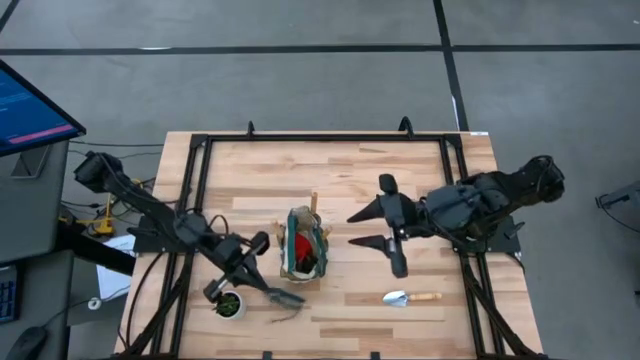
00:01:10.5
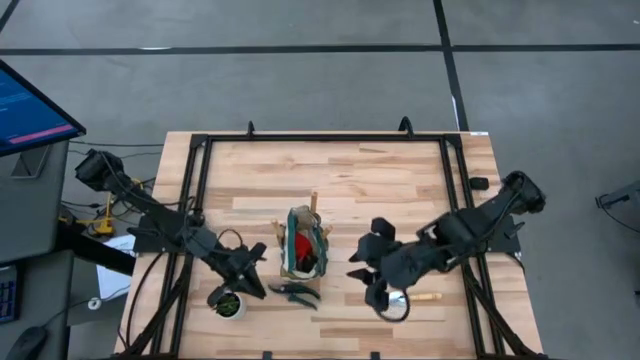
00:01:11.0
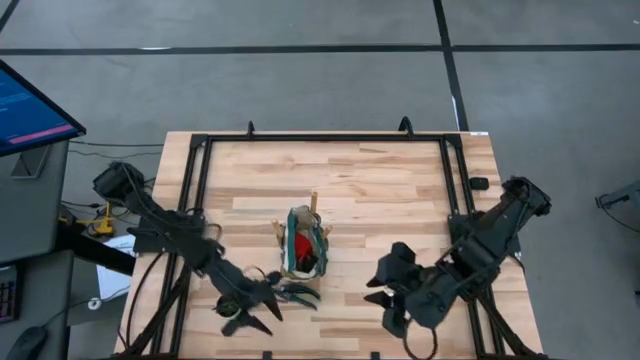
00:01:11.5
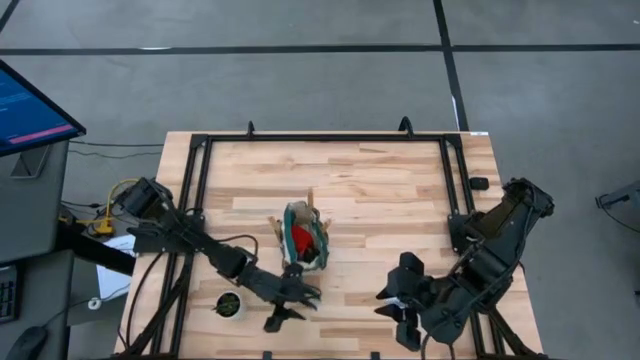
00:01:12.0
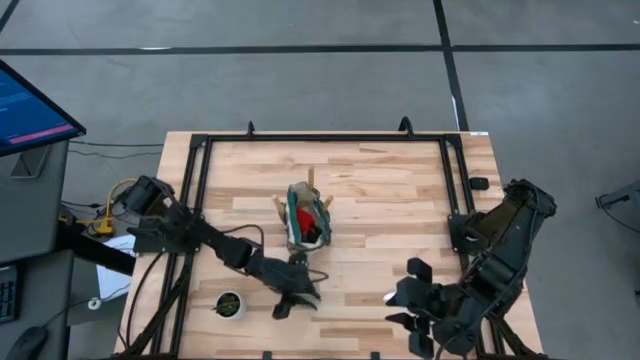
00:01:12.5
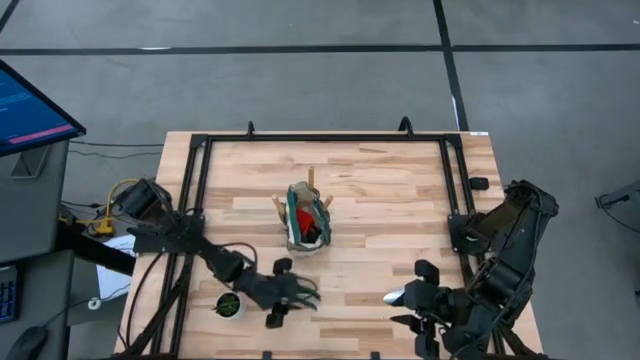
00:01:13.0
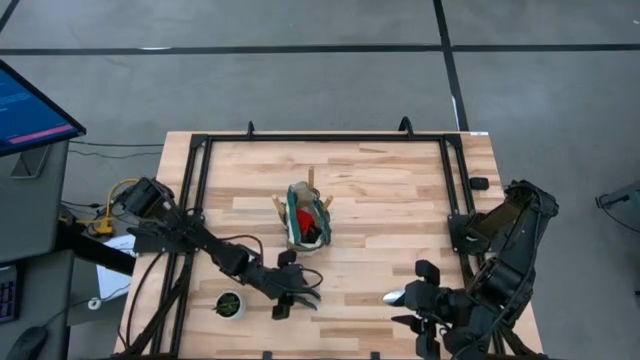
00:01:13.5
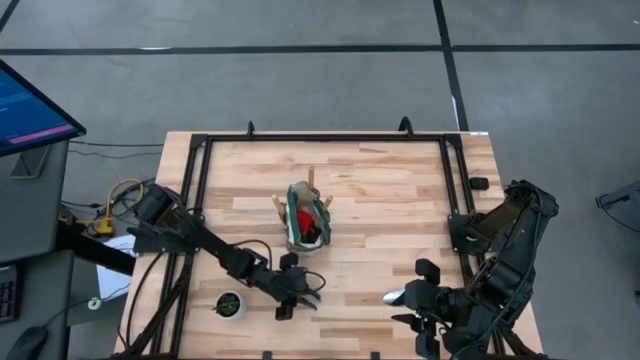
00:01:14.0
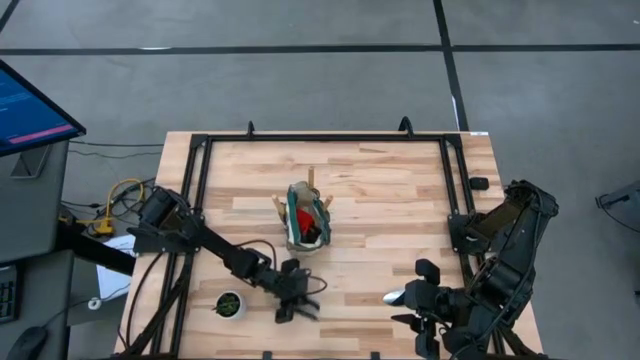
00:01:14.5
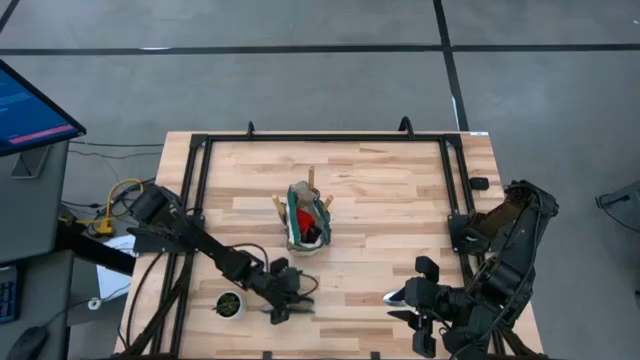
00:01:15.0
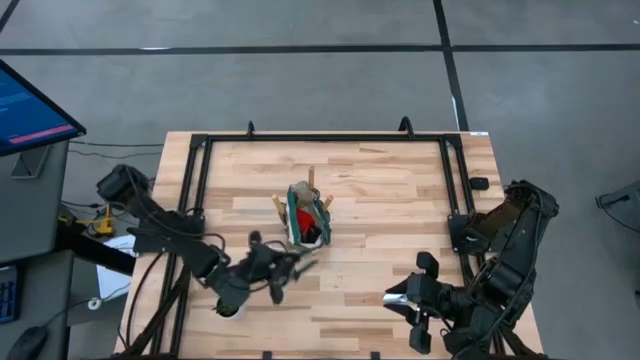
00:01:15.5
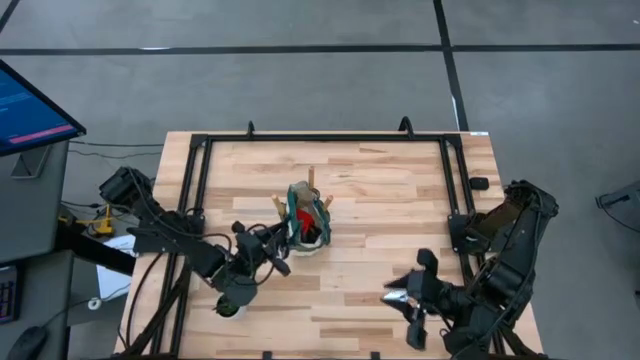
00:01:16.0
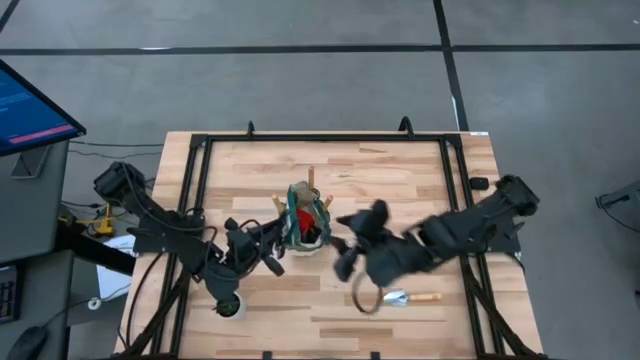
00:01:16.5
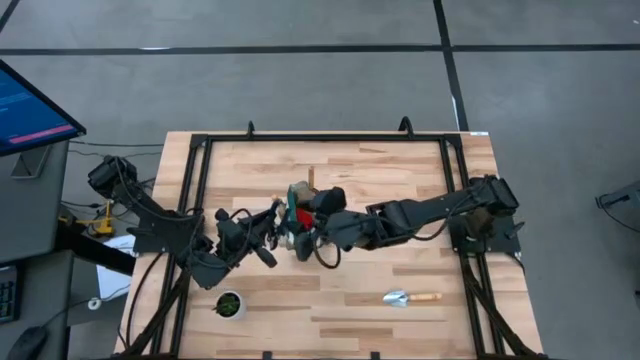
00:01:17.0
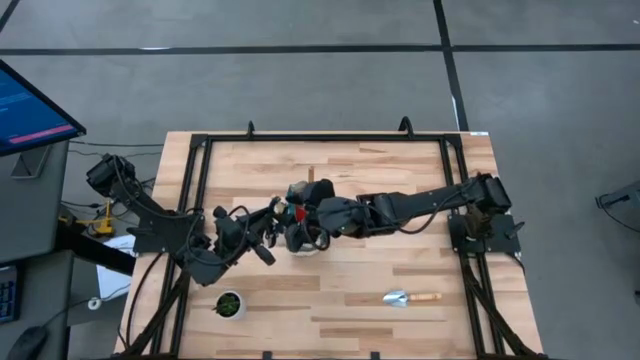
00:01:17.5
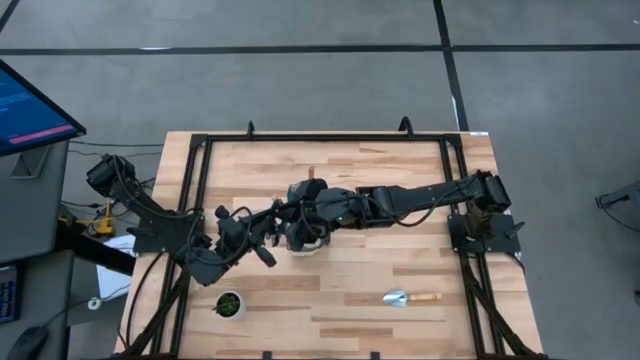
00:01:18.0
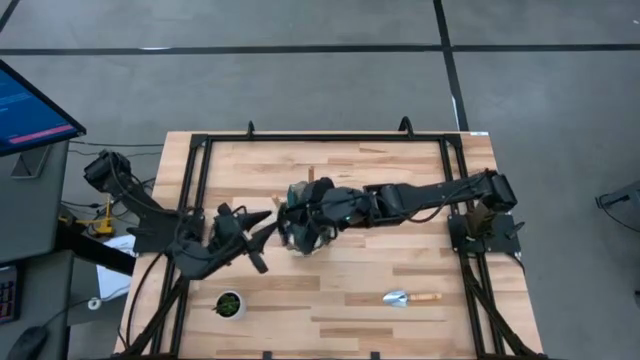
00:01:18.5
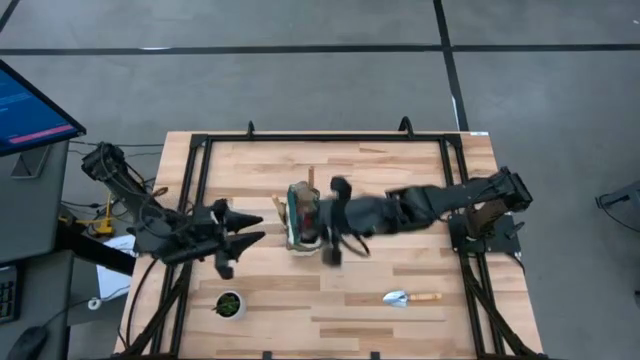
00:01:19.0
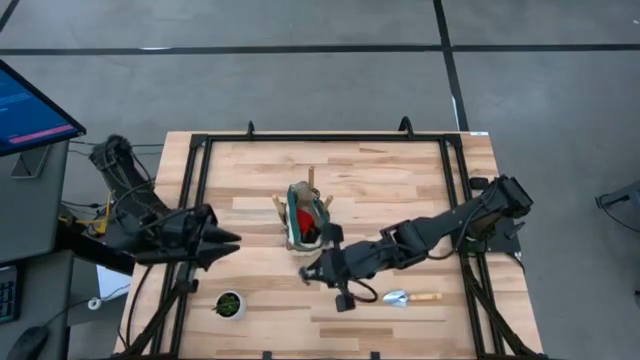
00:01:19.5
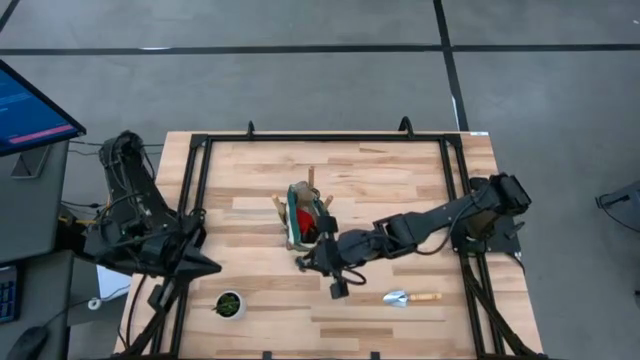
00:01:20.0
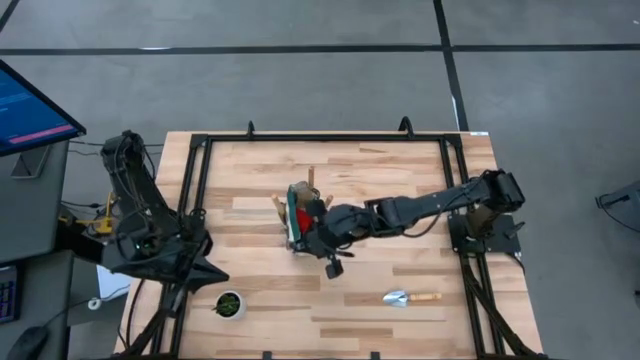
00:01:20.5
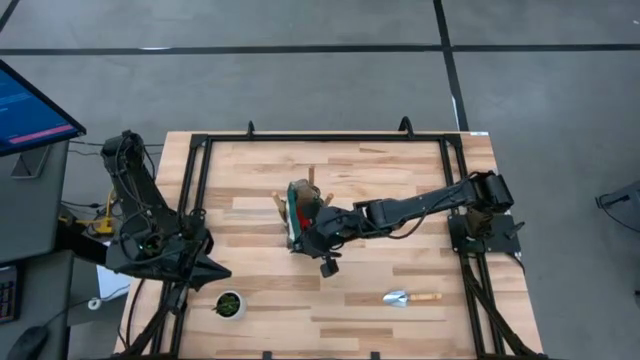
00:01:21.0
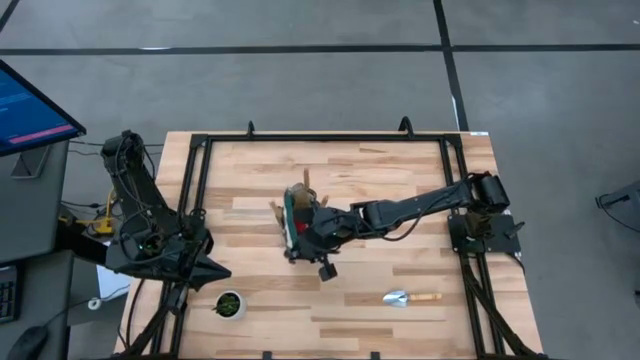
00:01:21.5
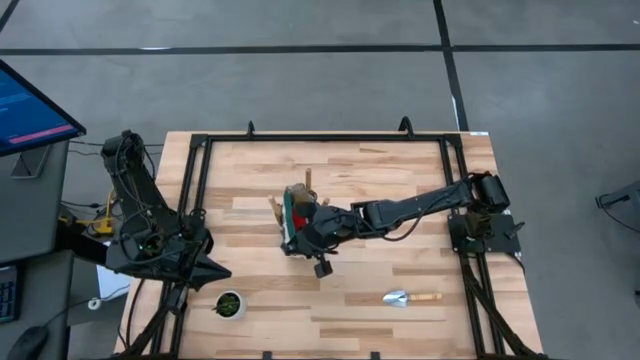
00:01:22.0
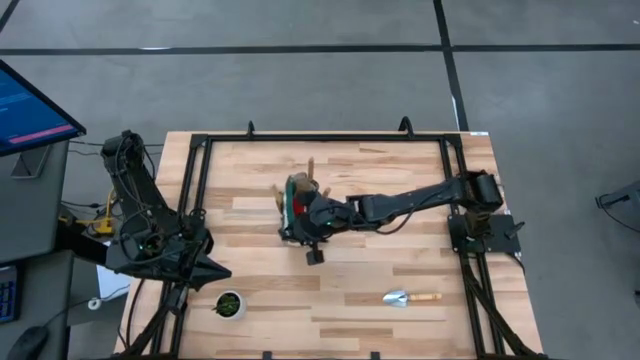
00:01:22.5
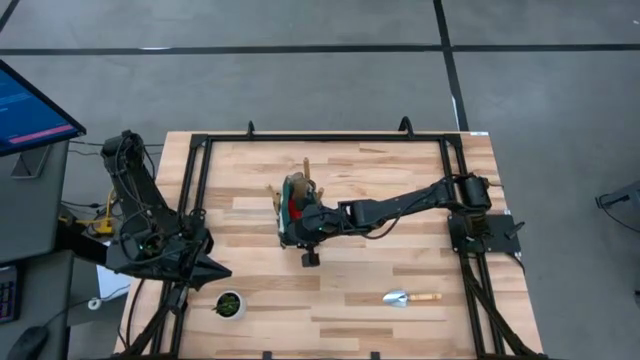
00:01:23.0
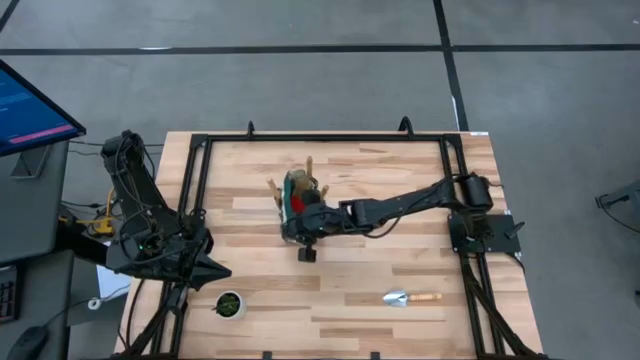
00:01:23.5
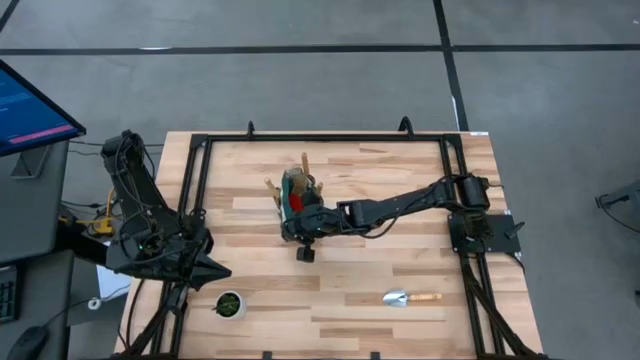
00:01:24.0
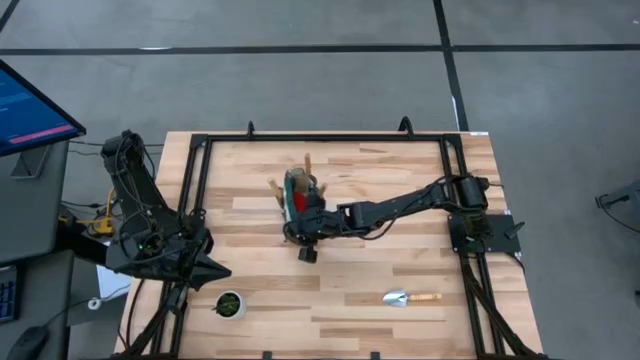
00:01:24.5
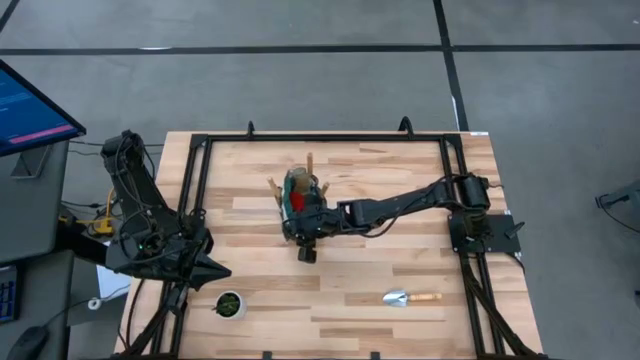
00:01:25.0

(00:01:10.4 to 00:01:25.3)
Task: Pick & Place Garden tools in Gardening bag
Put the green shear scissors into the green gardening bag

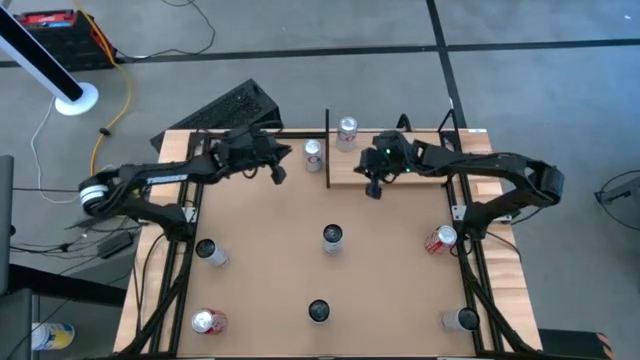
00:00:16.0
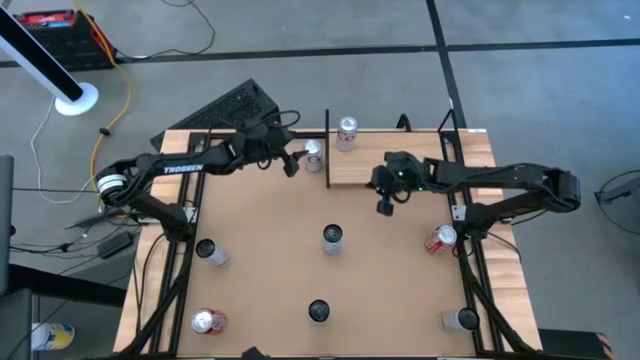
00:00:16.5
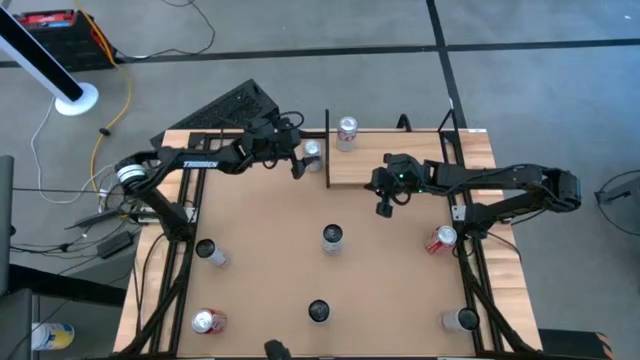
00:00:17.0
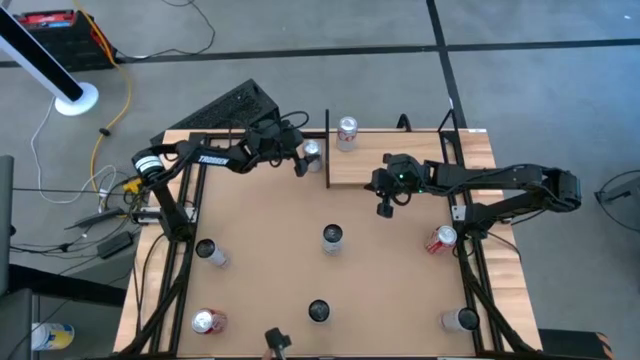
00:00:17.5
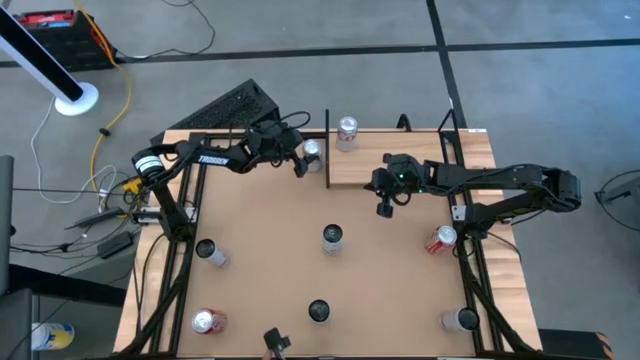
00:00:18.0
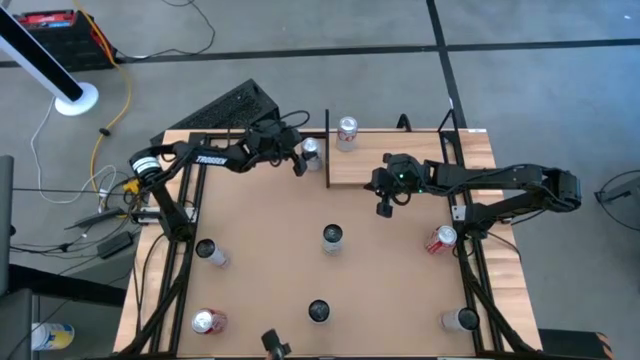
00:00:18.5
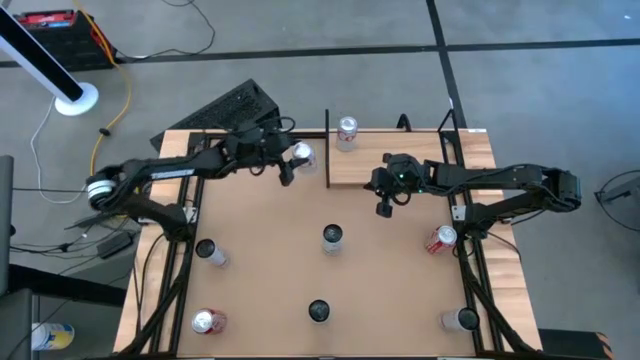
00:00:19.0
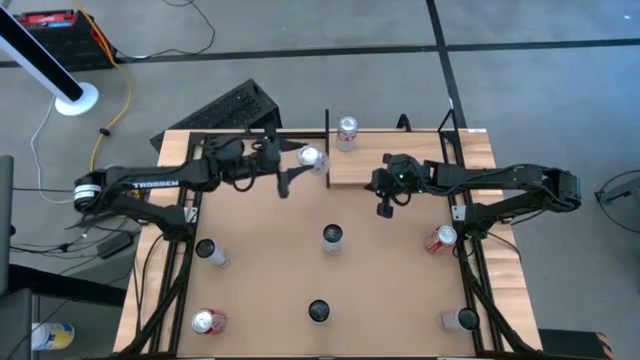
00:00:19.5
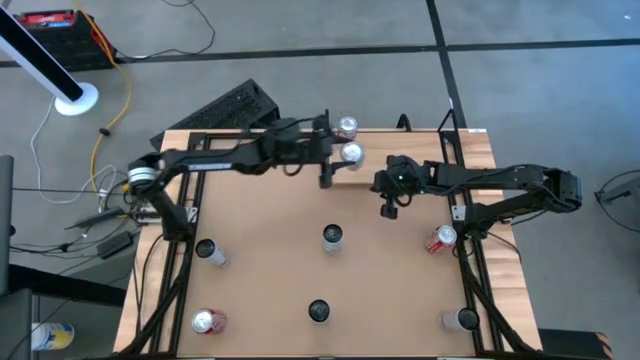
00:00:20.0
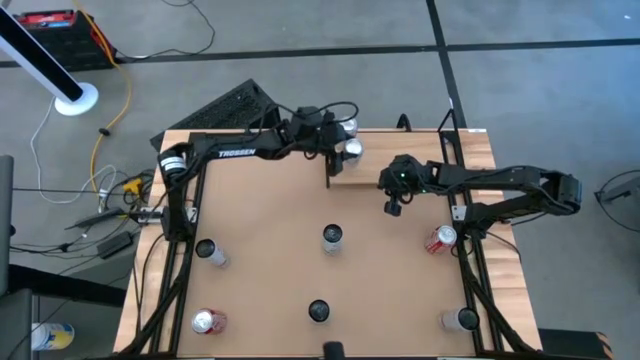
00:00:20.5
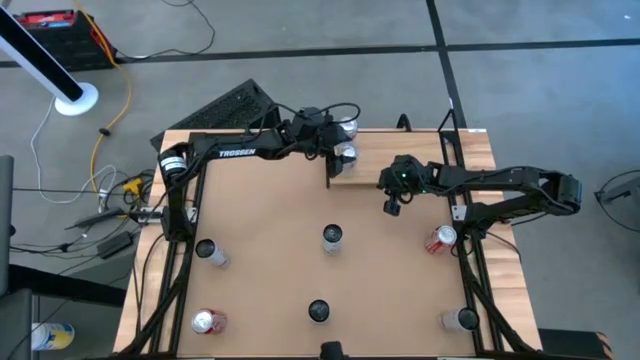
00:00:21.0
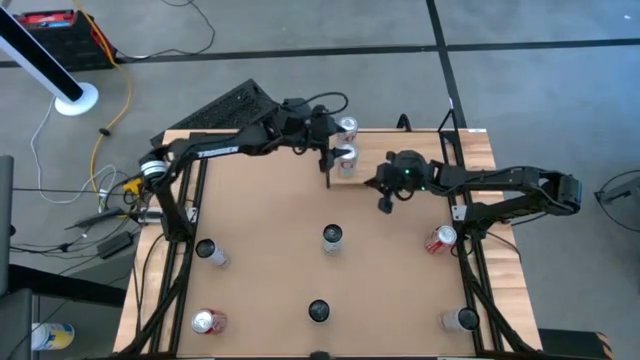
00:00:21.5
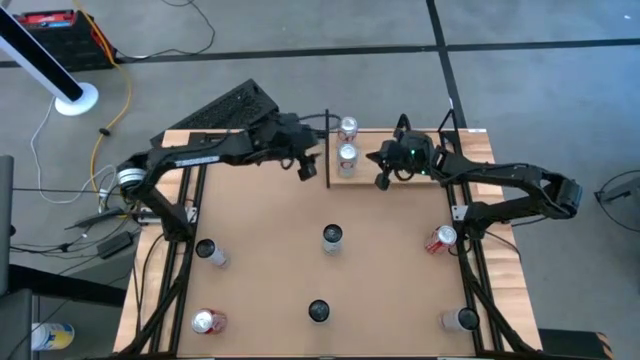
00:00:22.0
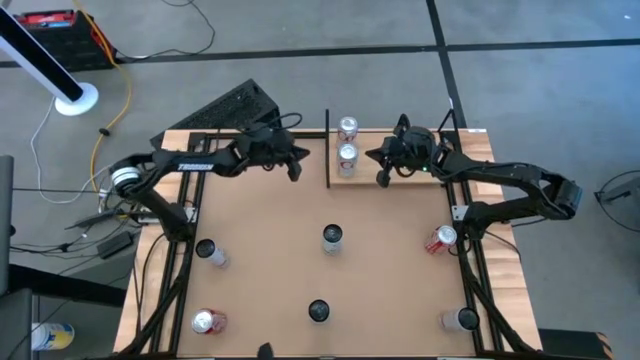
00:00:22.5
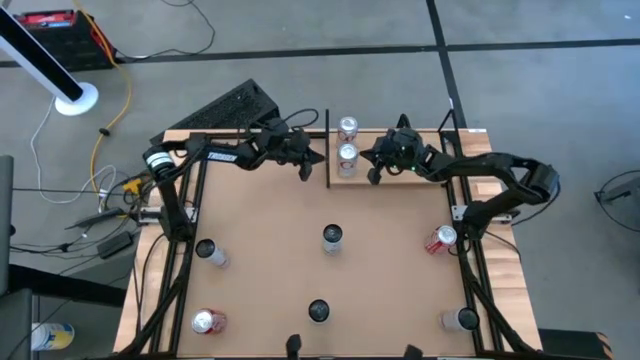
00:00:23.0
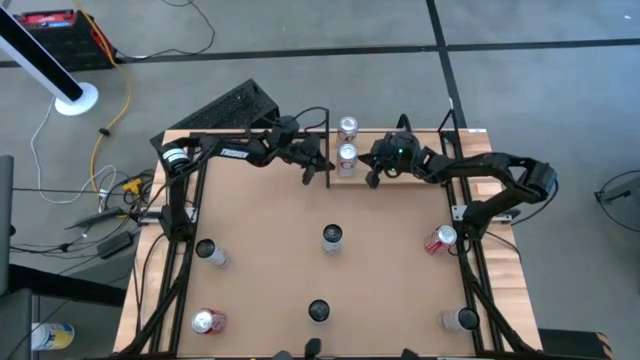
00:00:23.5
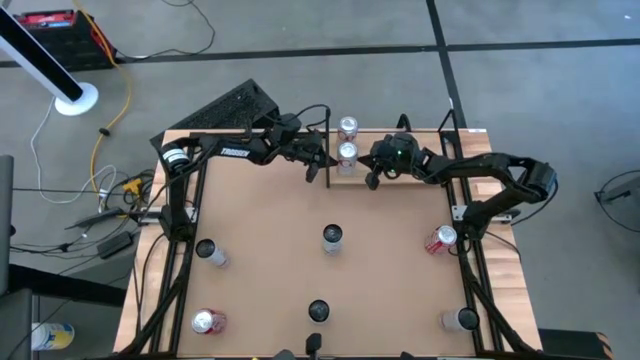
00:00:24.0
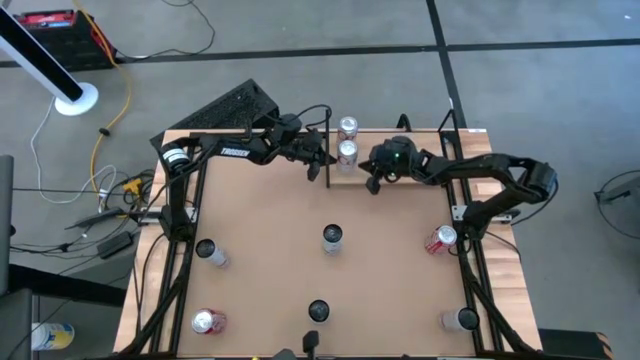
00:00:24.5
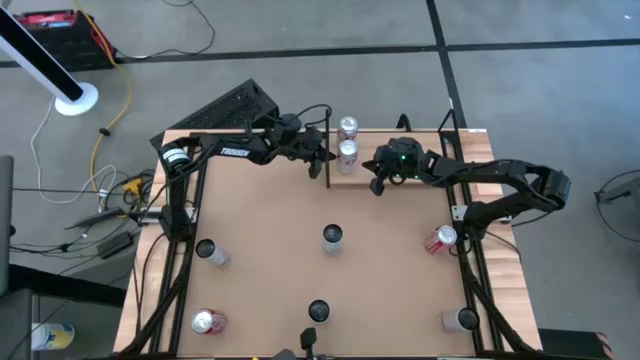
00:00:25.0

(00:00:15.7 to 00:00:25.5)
Task: Place canned beverage on shelf
Put the red-silver soda can on the shelf aligned with the other red-silver soda can
